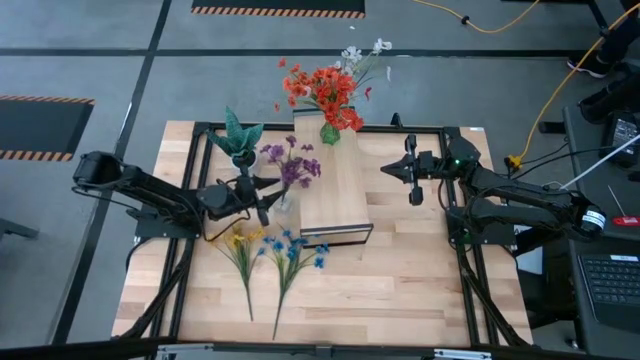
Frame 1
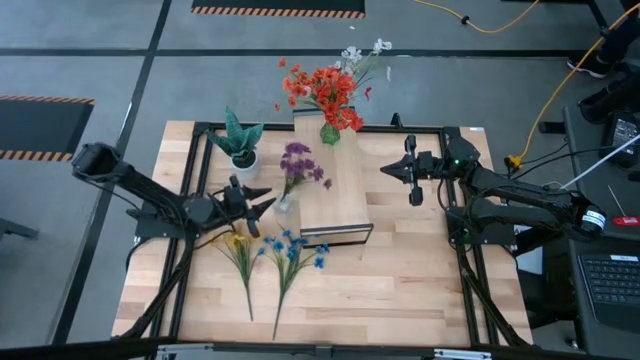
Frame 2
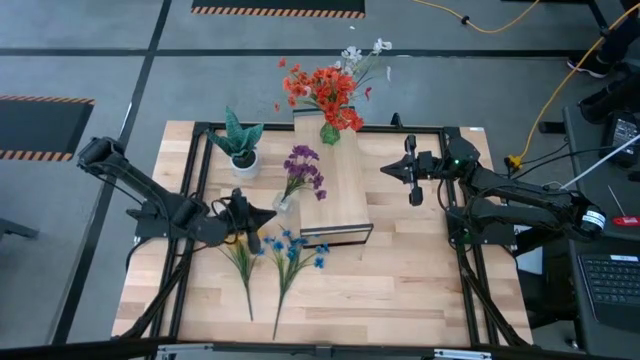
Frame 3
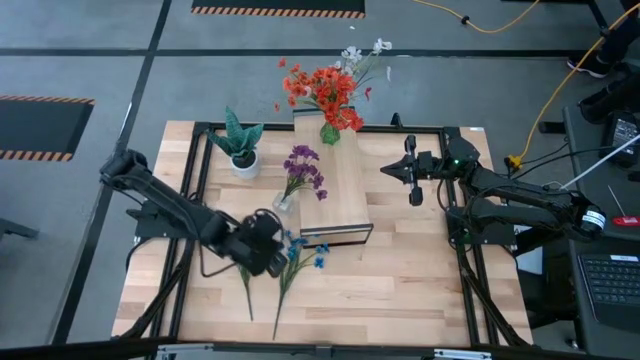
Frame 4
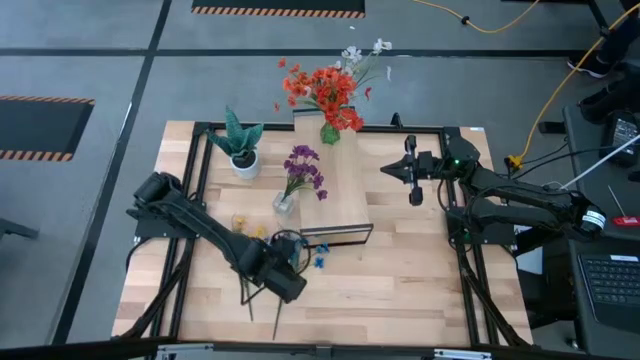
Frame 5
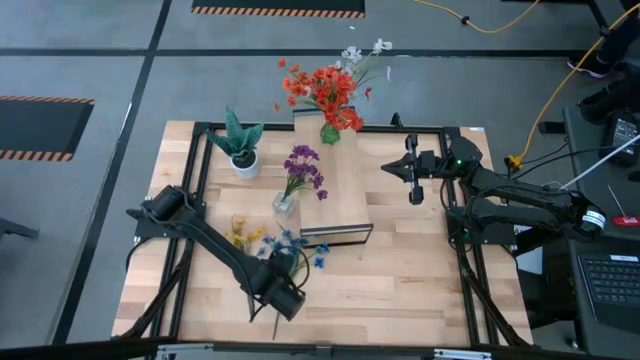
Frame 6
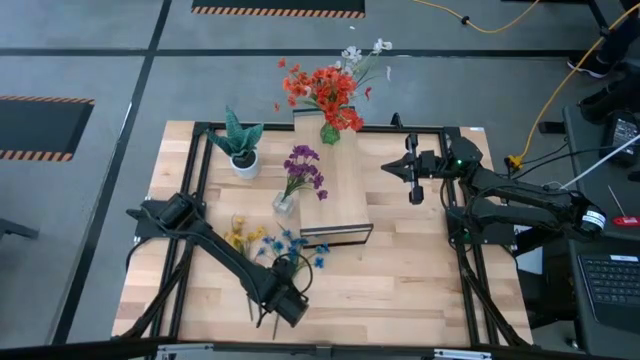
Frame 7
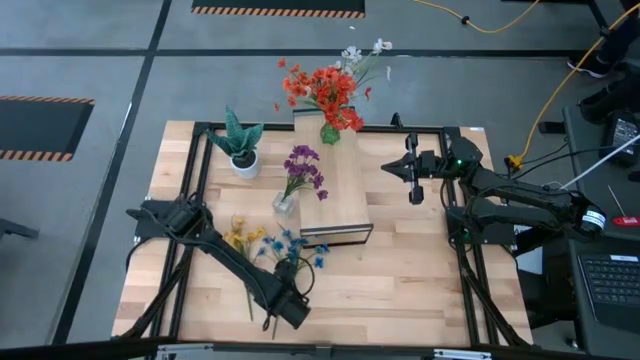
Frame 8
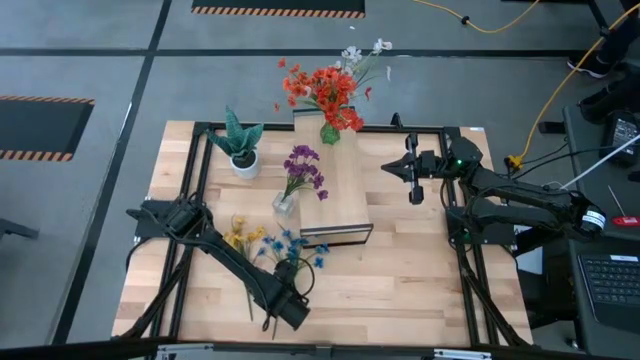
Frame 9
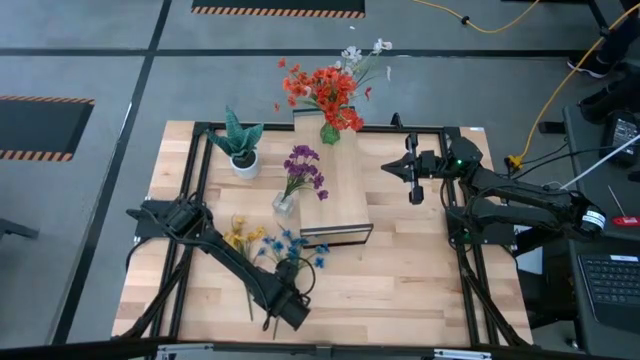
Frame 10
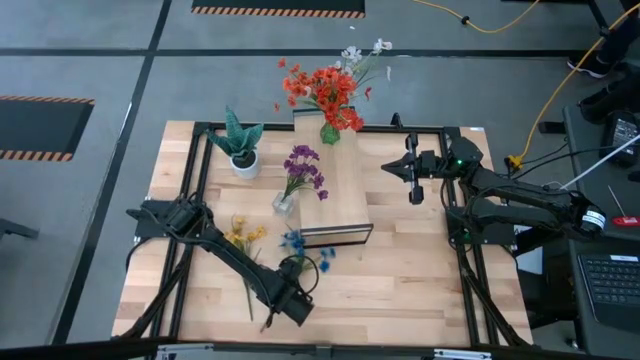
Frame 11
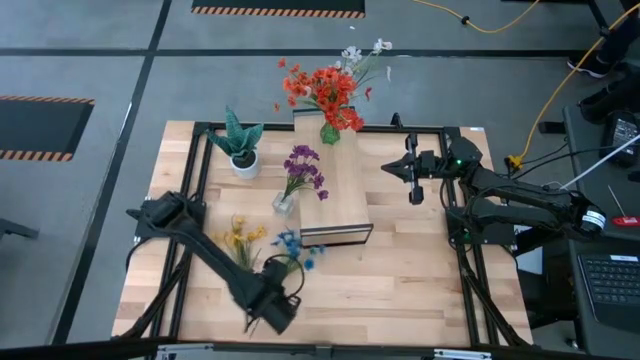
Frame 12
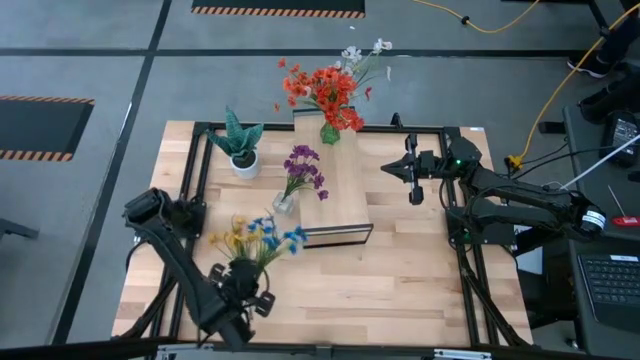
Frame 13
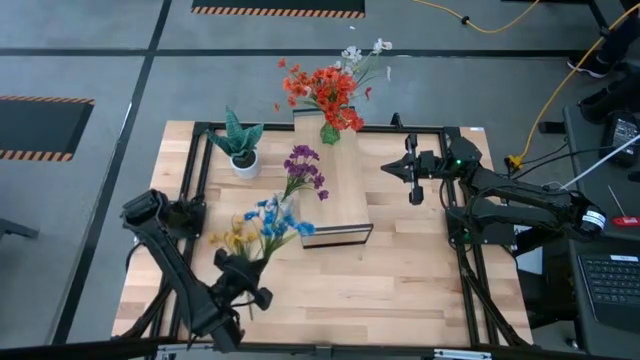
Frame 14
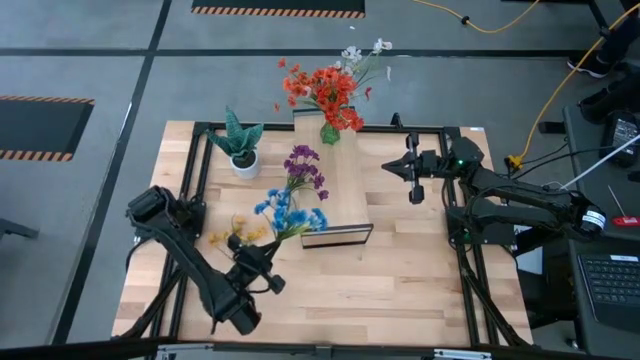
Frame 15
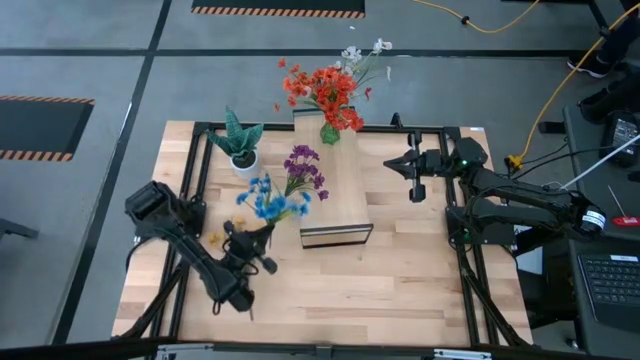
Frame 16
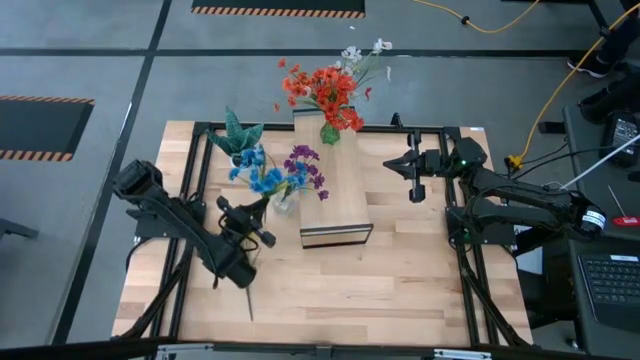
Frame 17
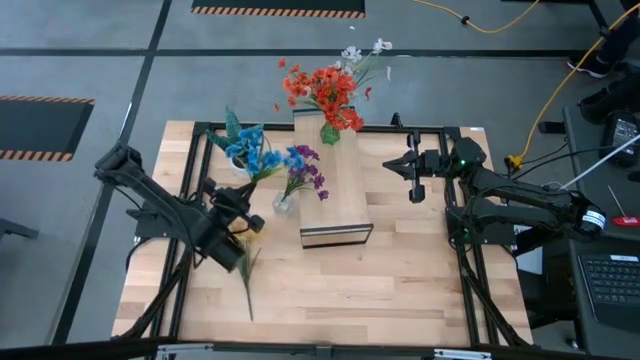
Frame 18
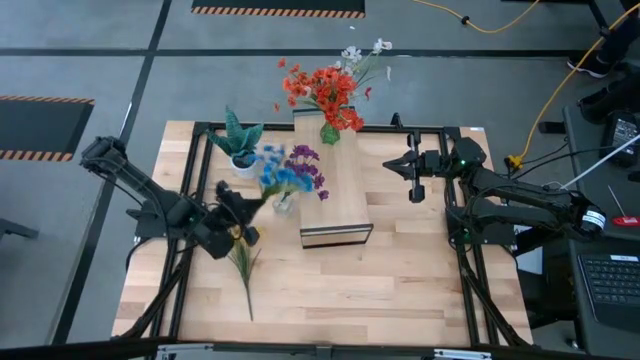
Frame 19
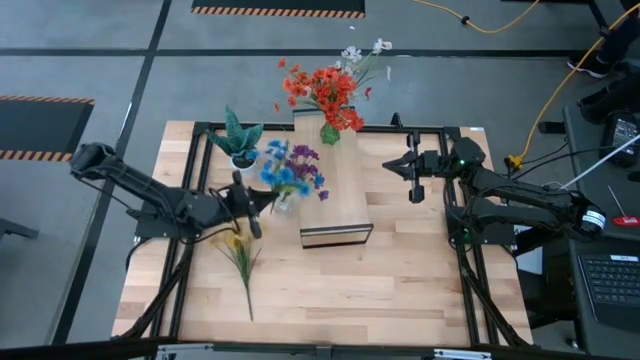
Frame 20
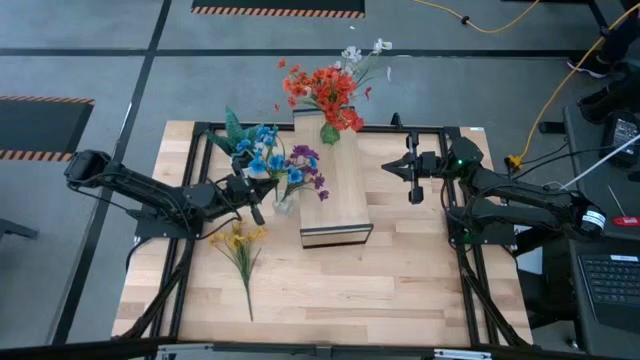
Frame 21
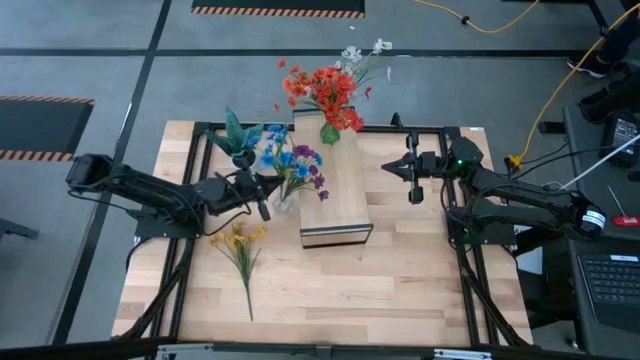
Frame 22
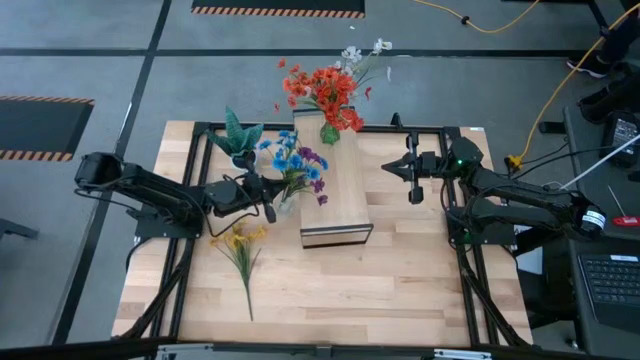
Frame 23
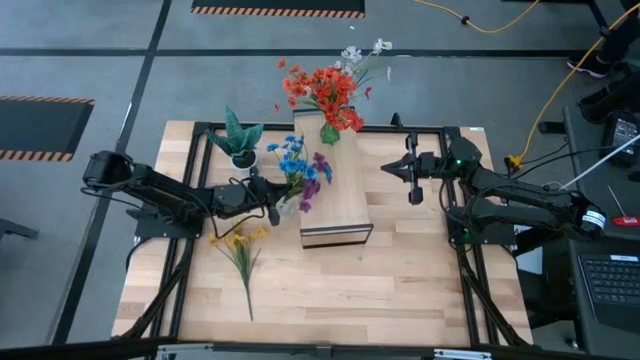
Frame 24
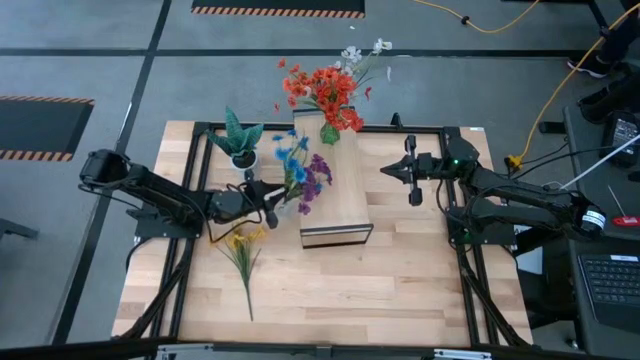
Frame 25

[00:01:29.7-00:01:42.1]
Task: Pick and place flowers into a vace then onto a shelf
Put the blue flowers into the transparent vase

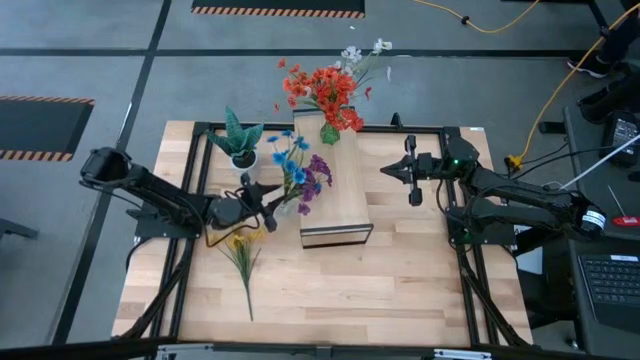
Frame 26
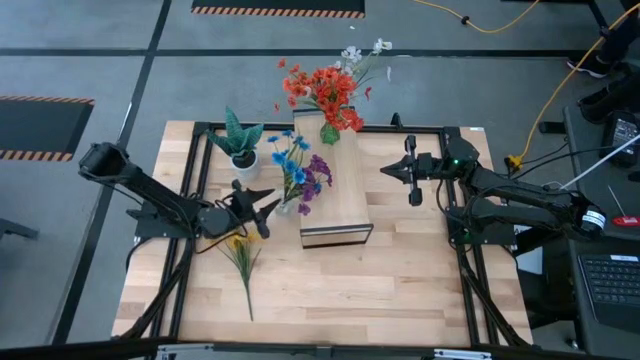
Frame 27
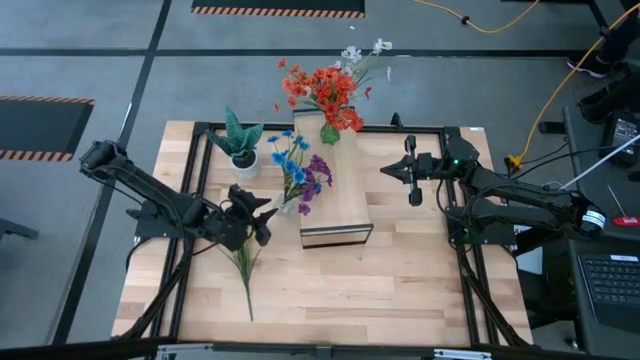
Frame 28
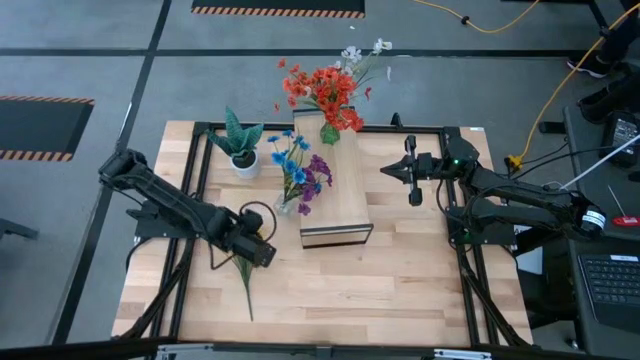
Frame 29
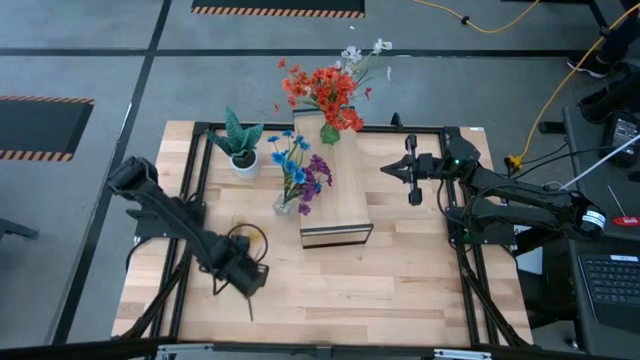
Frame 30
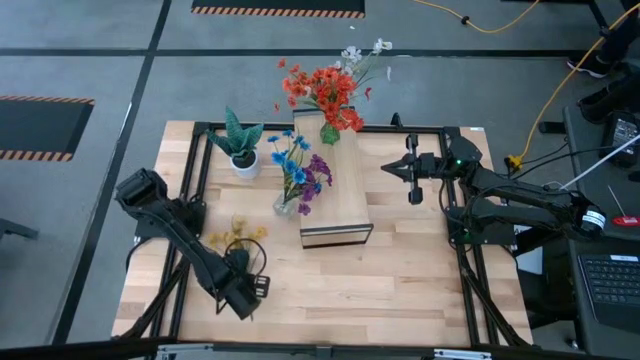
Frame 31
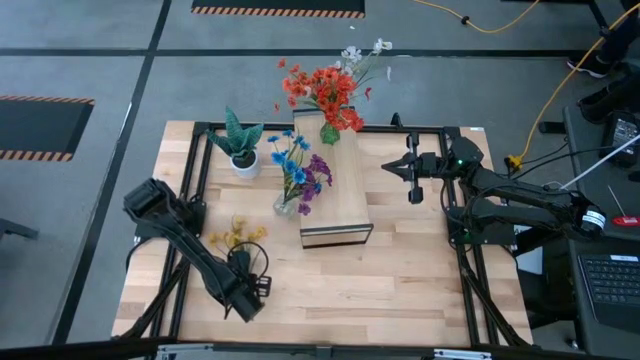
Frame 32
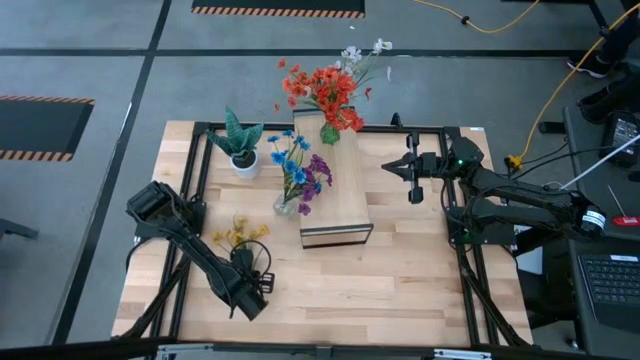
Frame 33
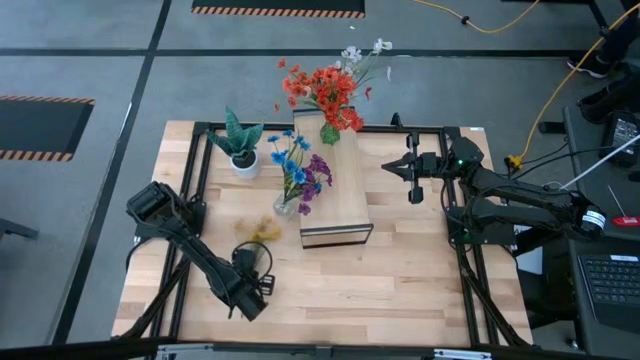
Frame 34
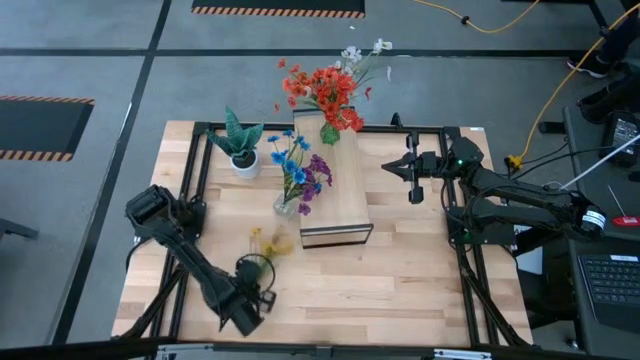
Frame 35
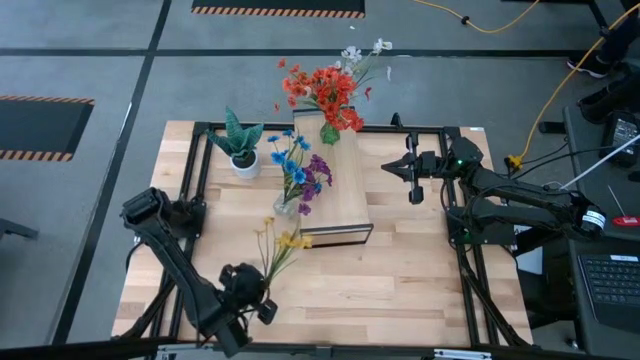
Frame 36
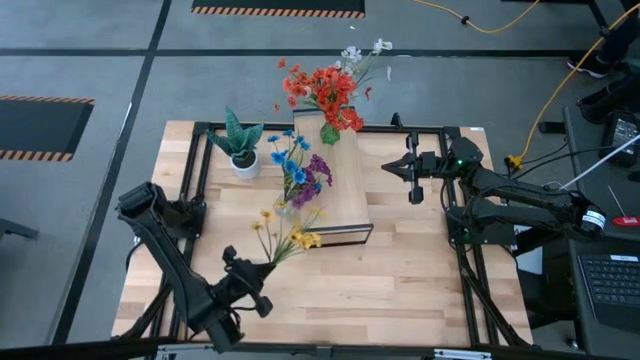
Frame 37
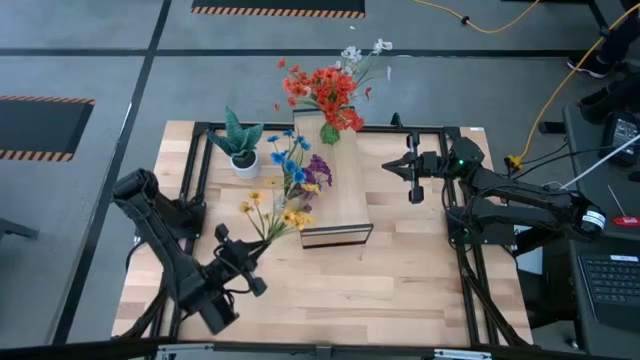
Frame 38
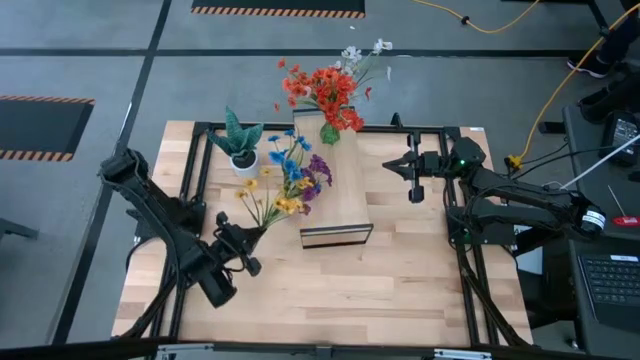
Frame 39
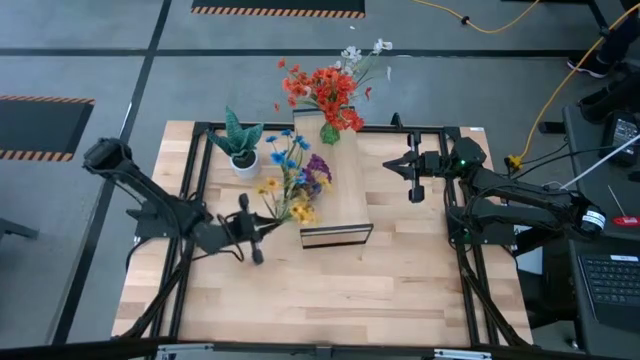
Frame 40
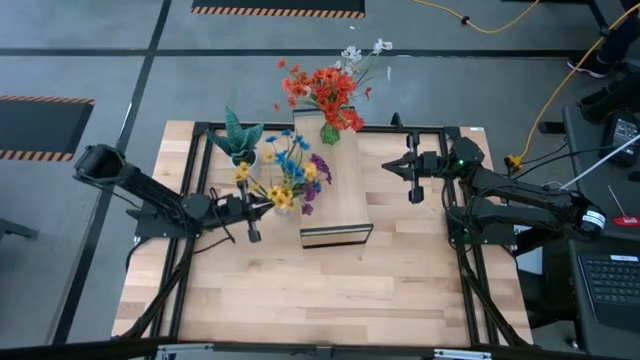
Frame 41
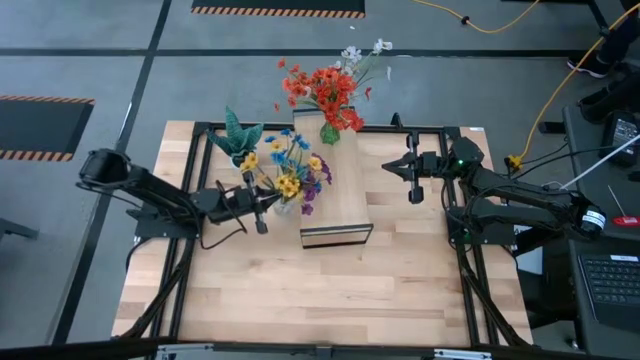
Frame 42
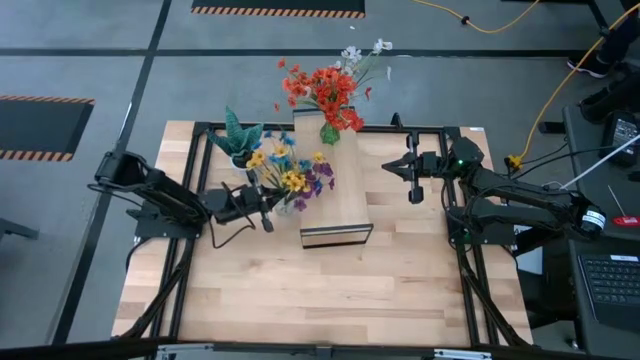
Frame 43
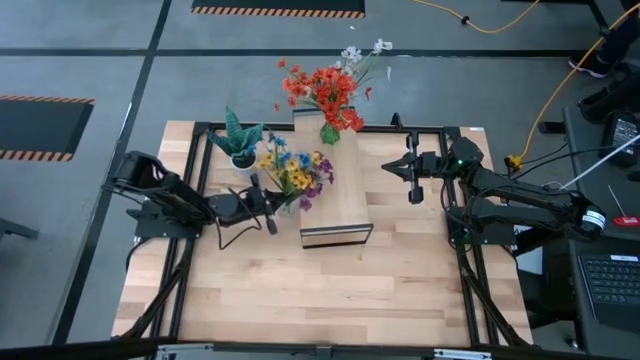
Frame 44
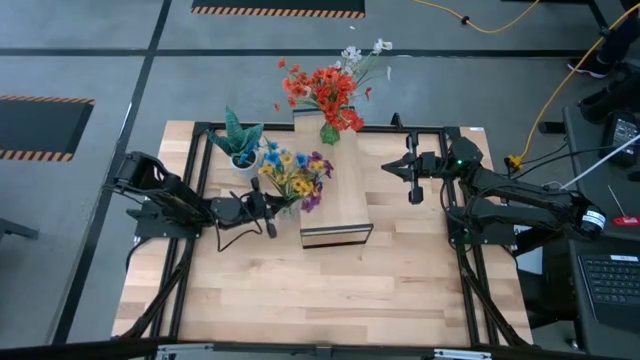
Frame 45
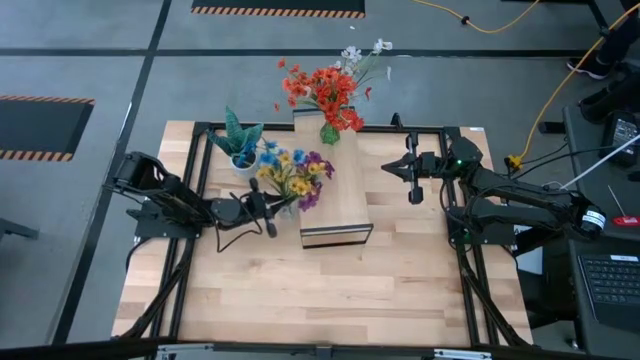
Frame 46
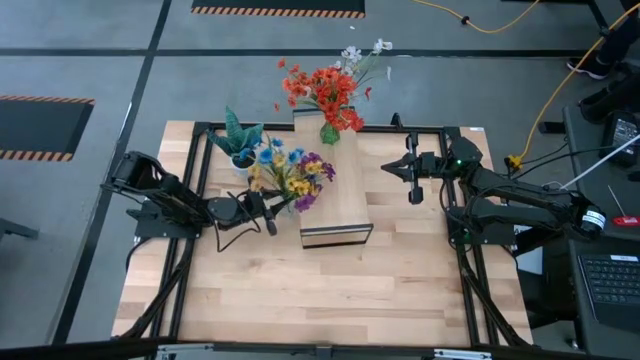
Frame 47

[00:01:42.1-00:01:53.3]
Put the yellow flowers into the transparent vase
